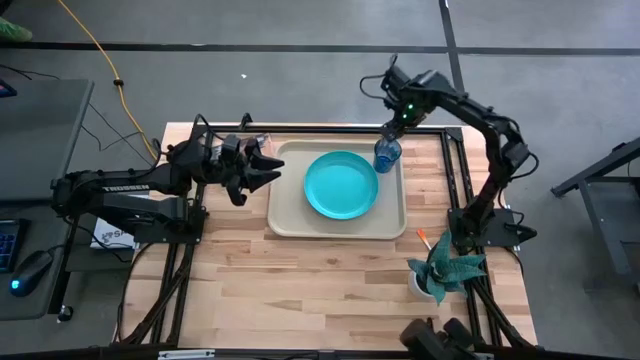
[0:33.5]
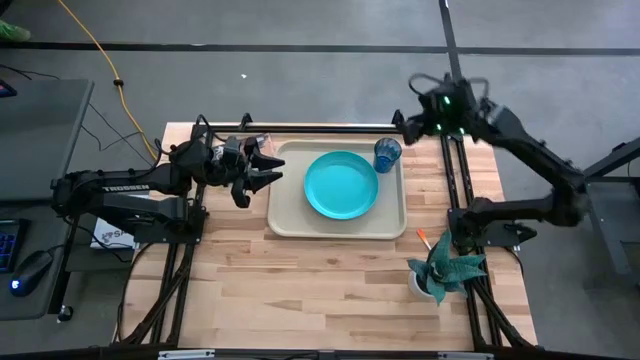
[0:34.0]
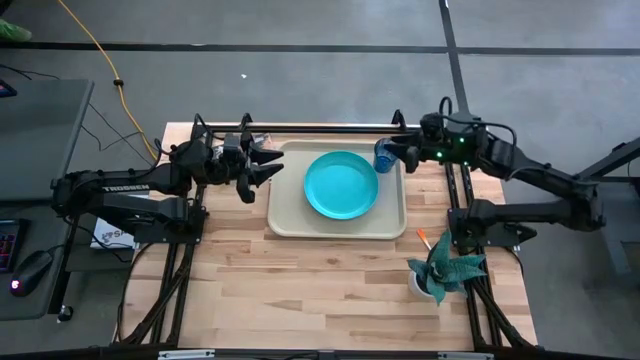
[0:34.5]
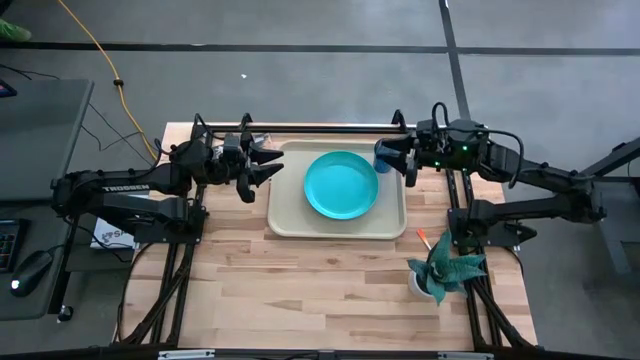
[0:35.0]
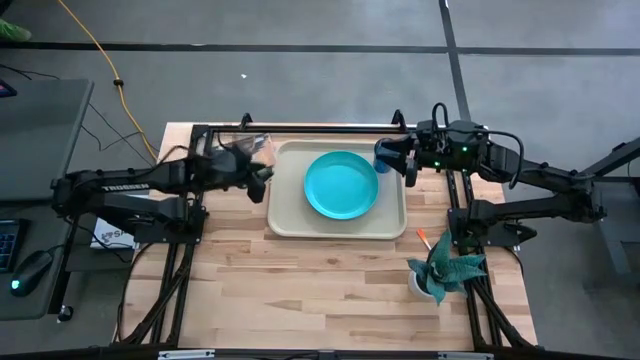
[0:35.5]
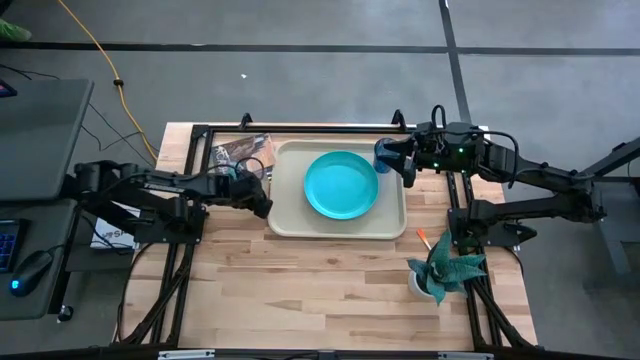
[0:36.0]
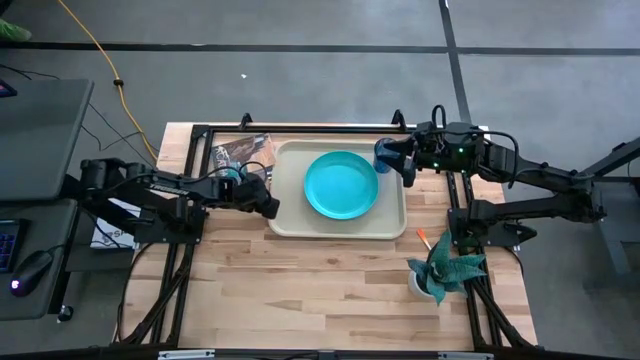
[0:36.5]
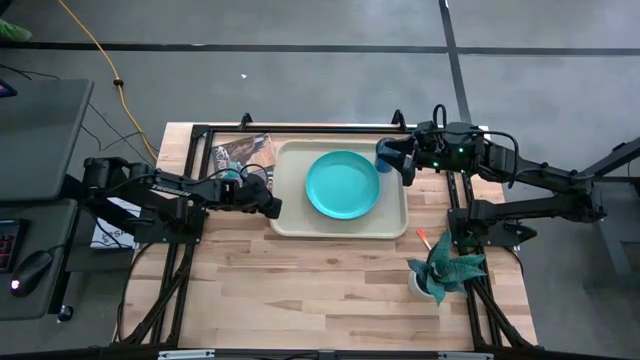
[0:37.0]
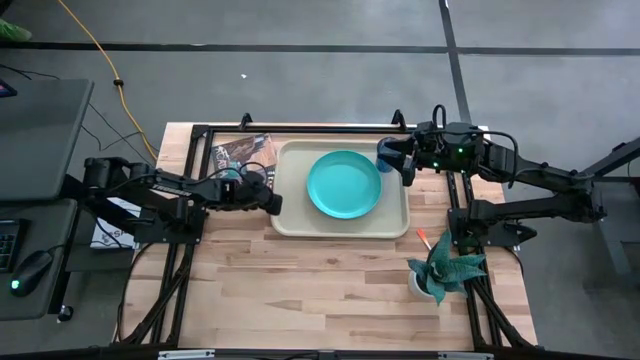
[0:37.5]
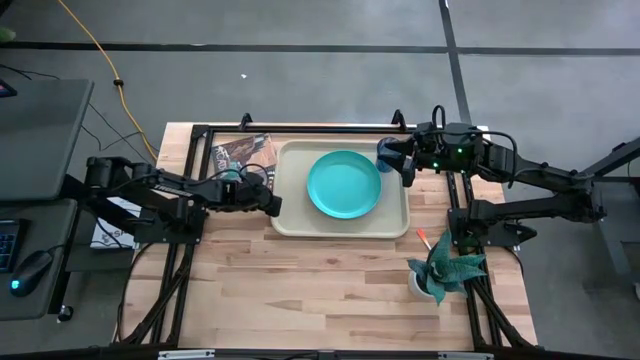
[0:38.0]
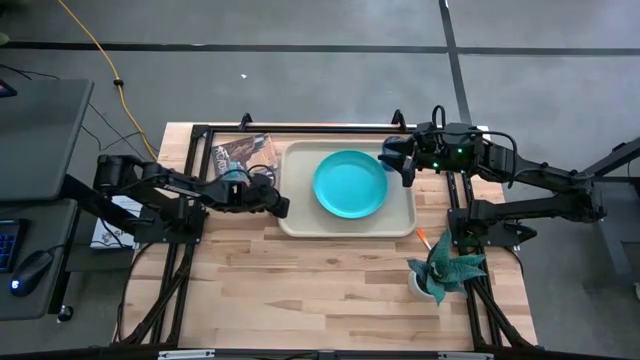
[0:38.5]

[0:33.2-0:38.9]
Task: Pick and place plate/cup/fork/spoon on tray
Adjust the gray tray

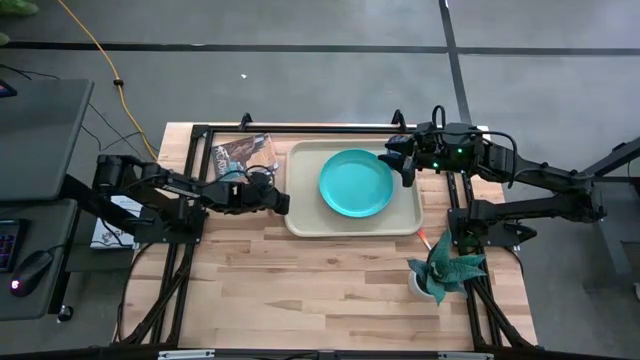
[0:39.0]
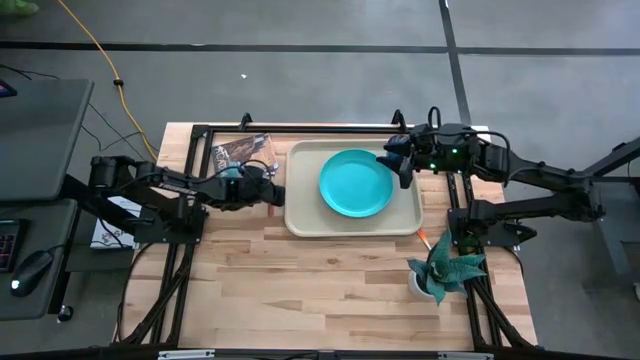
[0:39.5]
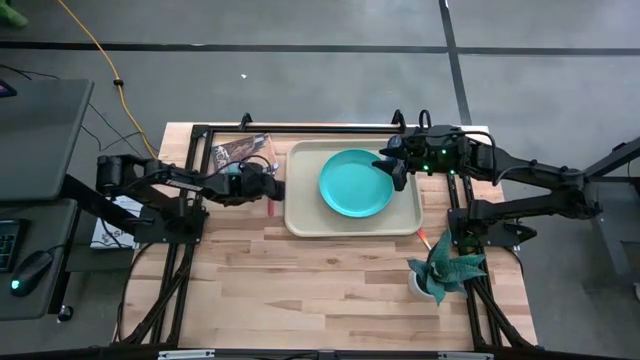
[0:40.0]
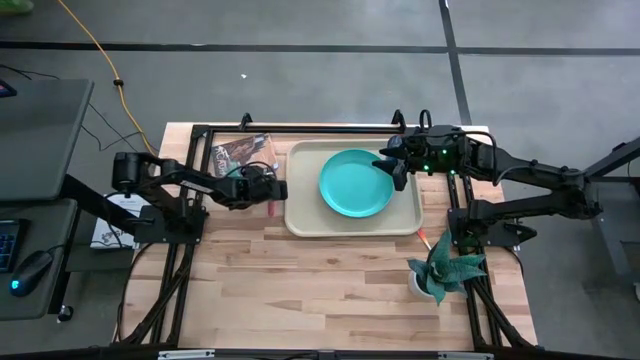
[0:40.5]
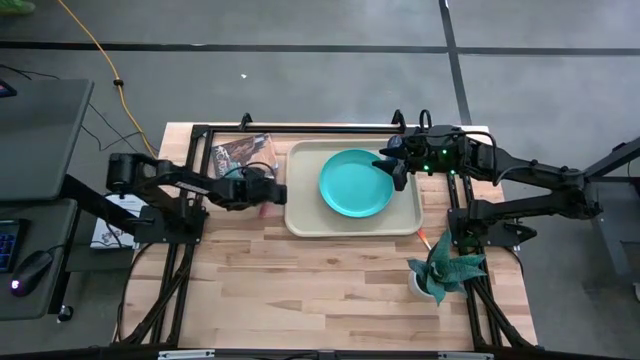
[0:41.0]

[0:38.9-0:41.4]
Put the red fork on the gray tray

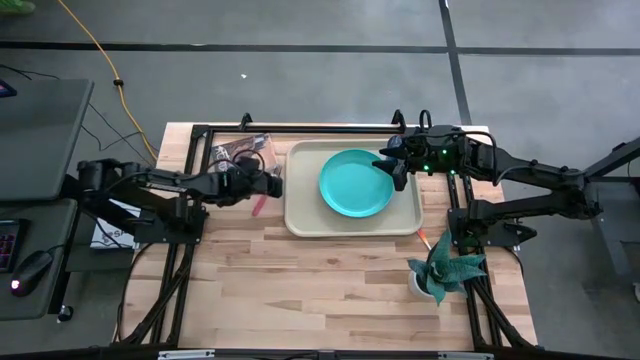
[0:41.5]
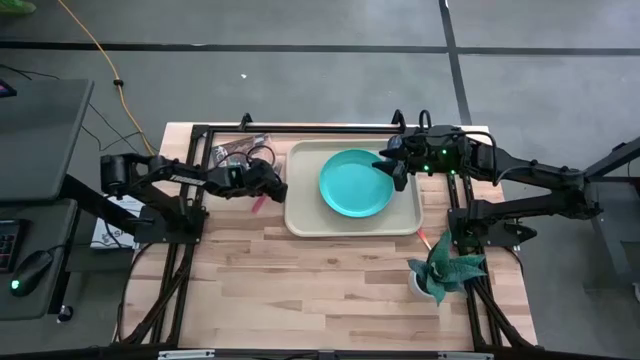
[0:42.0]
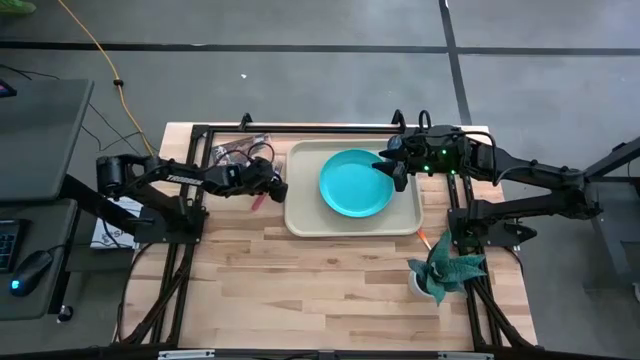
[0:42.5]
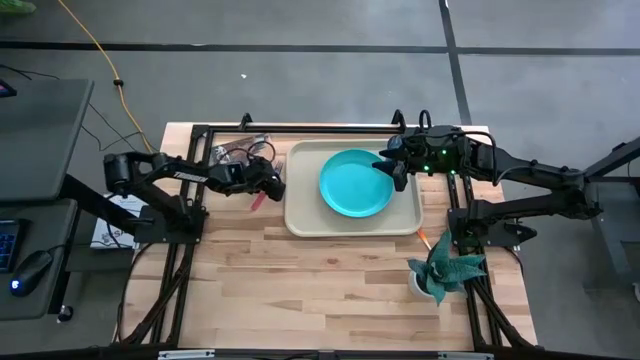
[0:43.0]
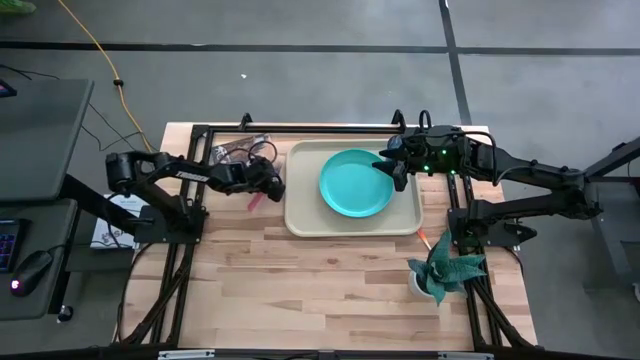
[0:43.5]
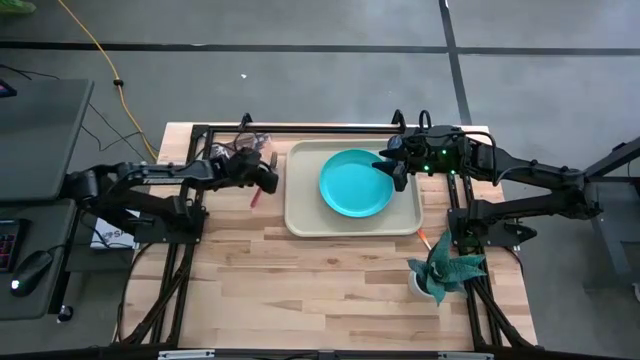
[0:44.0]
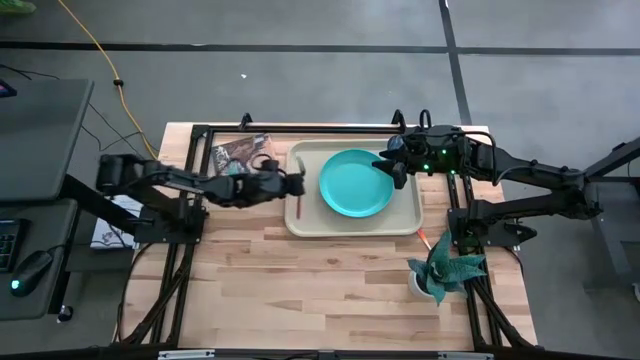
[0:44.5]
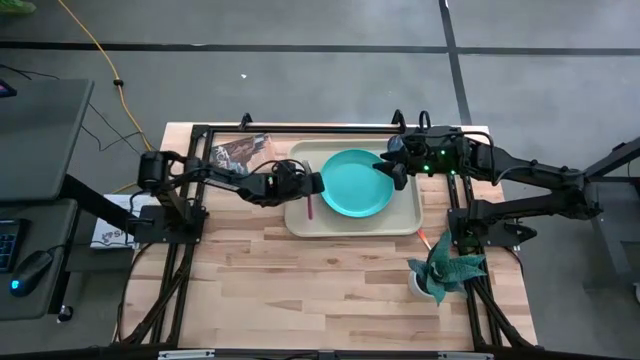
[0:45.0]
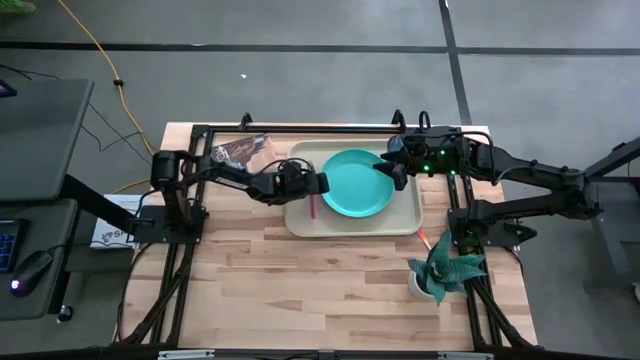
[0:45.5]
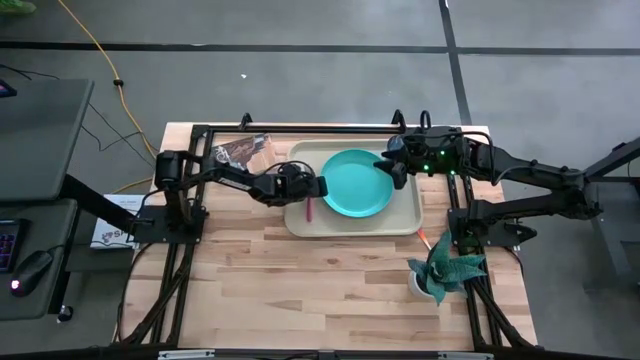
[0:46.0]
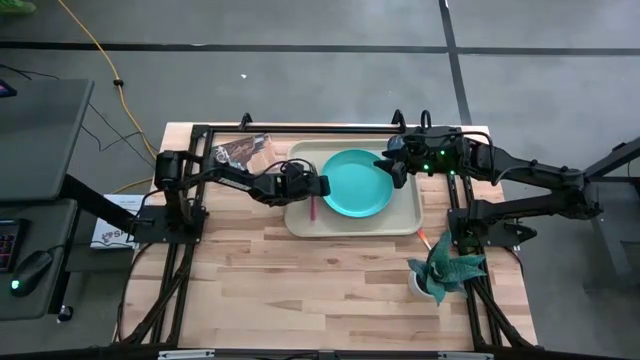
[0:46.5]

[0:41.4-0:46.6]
Put the red fork on the gray tray

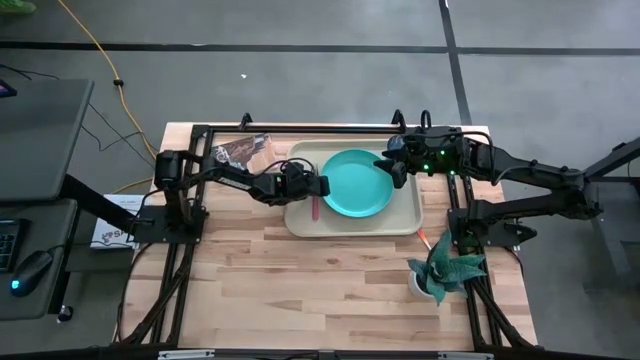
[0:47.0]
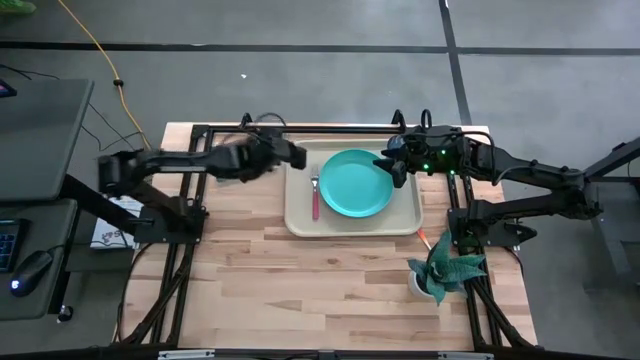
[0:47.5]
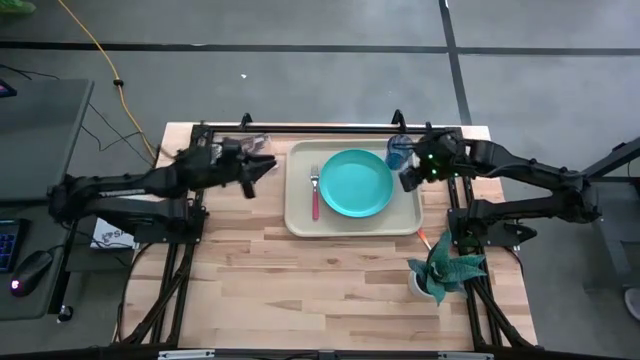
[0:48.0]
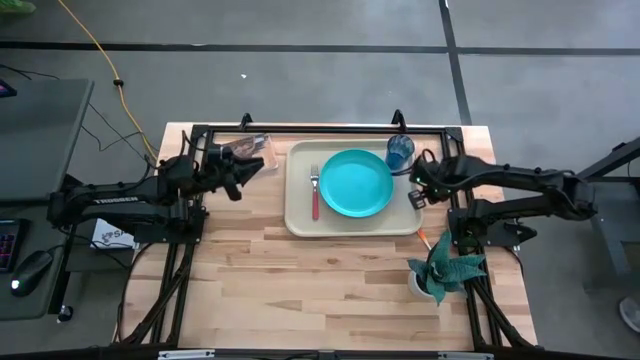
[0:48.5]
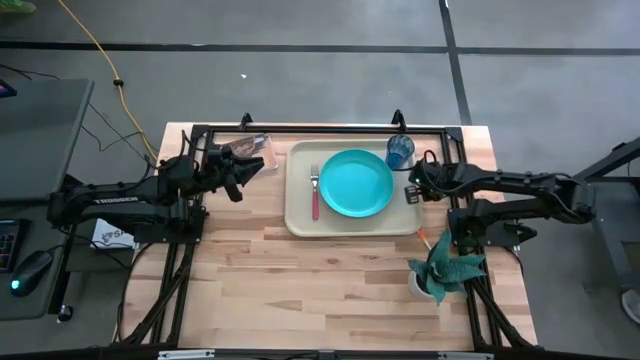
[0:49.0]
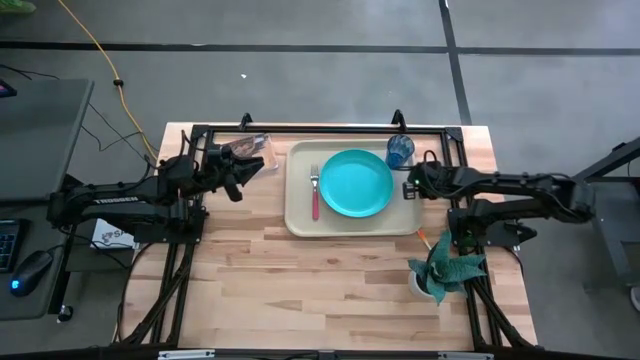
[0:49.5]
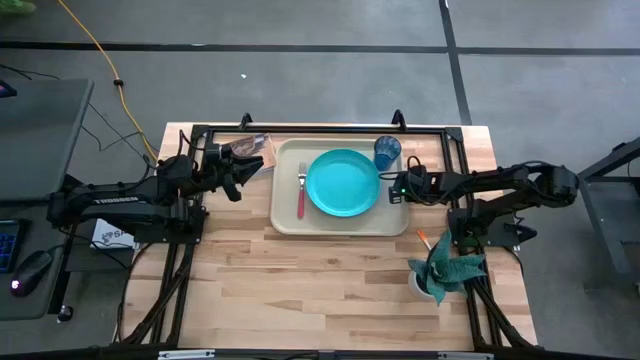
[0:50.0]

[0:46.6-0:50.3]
Adjust the gray tray

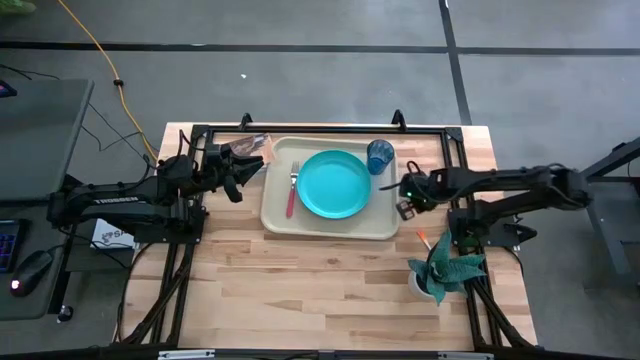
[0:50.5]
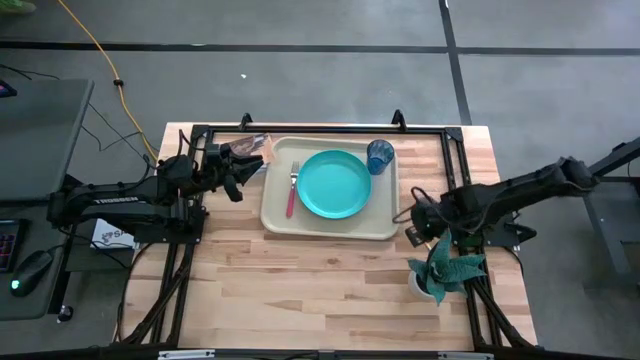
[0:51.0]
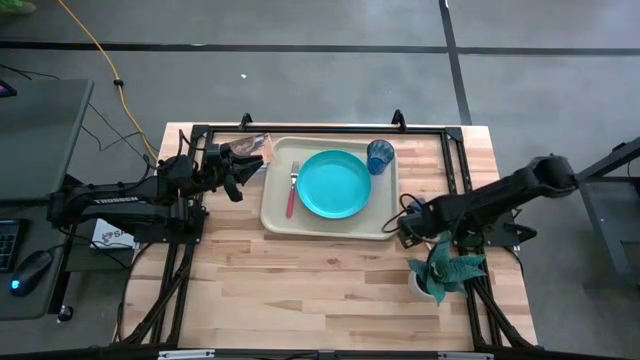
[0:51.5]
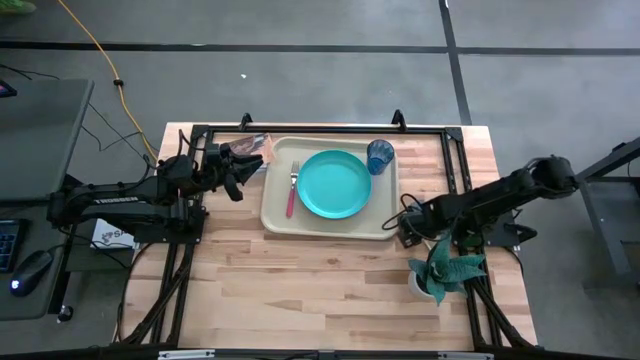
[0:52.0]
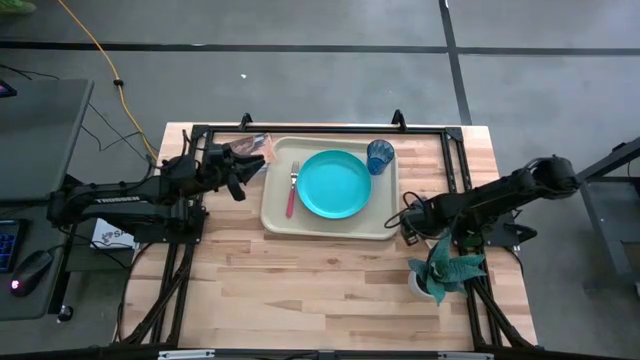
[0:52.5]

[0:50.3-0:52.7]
Put the orange spoon on the gray tray

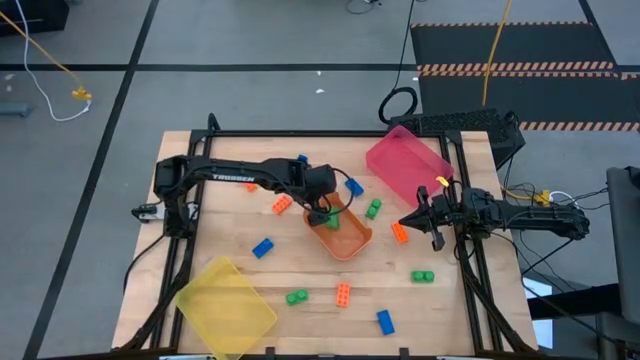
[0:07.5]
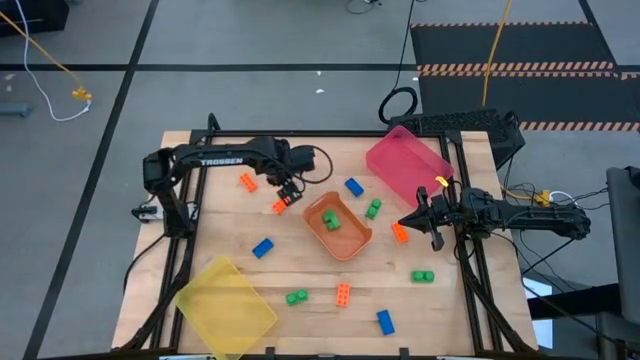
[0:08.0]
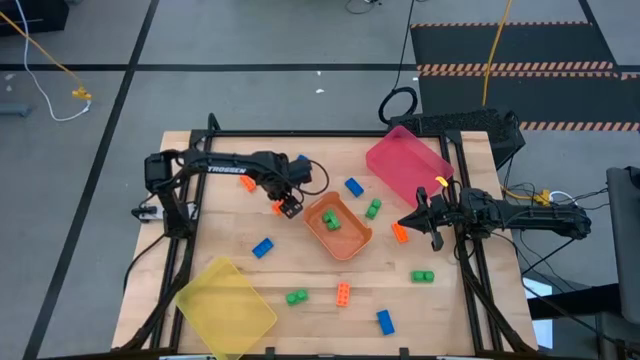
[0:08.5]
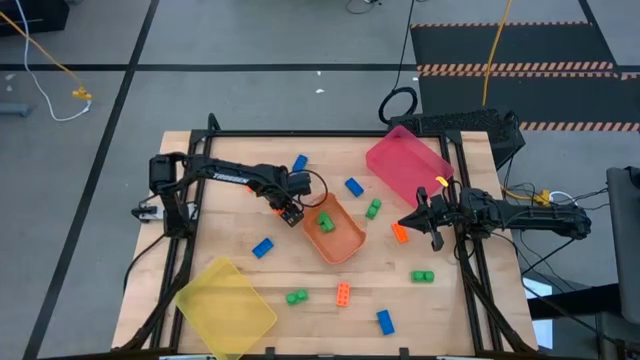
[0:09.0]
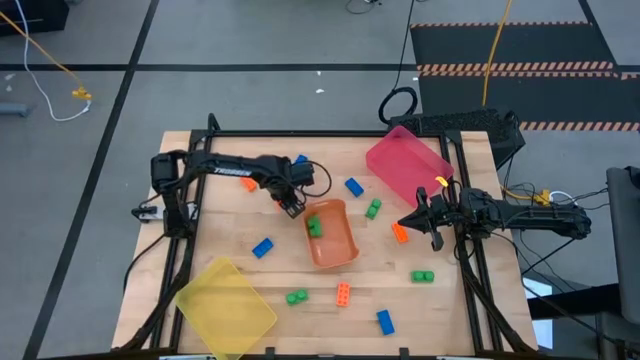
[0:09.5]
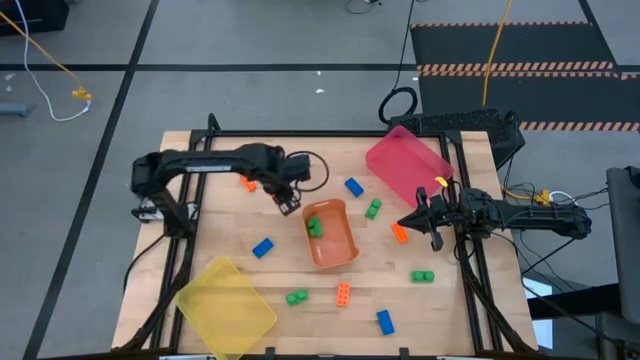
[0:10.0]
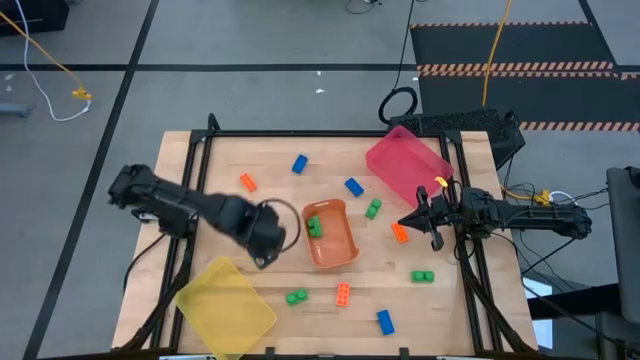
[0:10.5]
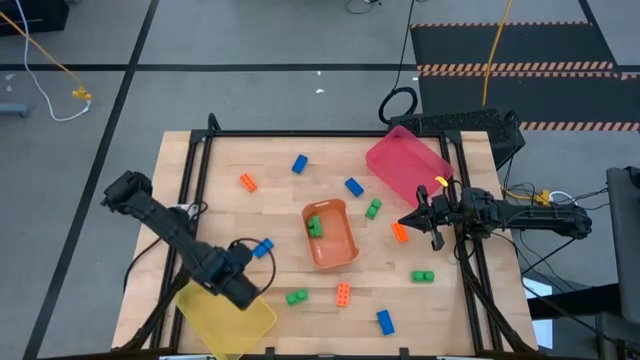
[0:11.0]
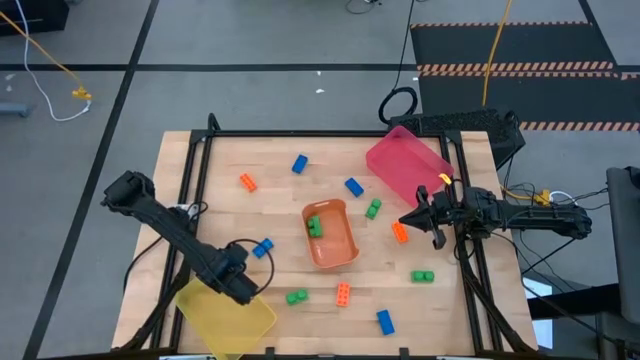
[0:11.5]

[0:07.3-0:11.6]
Task: Sort & place blocks by color
Put the orange game piece into the yellow bin
